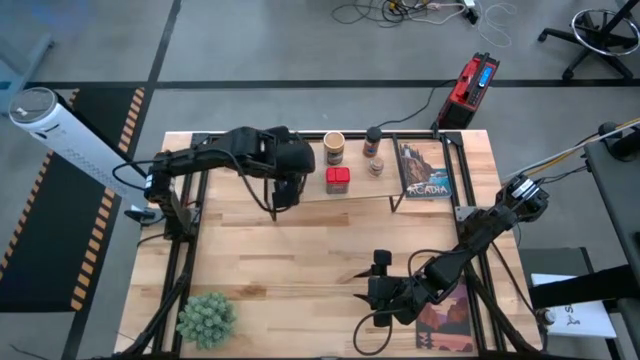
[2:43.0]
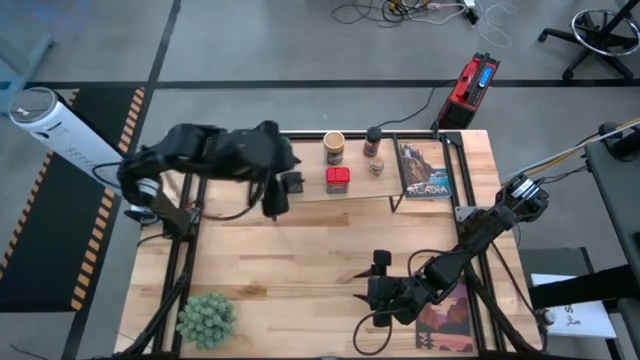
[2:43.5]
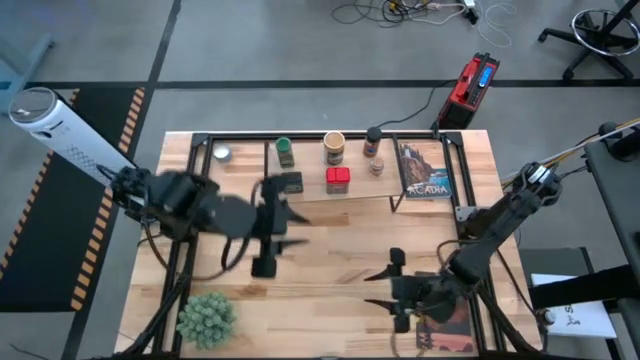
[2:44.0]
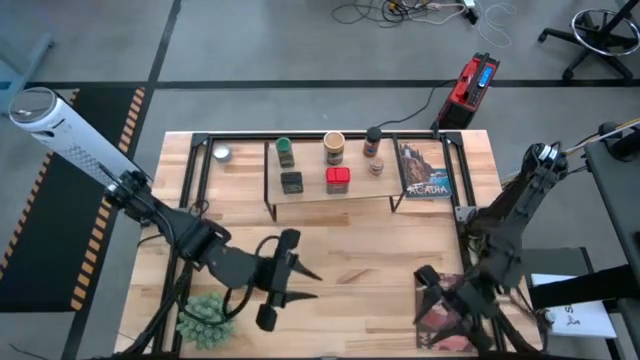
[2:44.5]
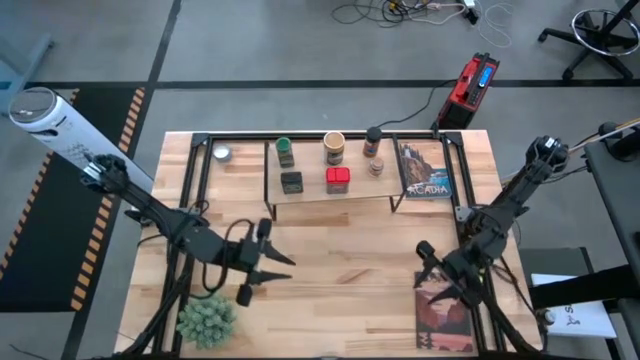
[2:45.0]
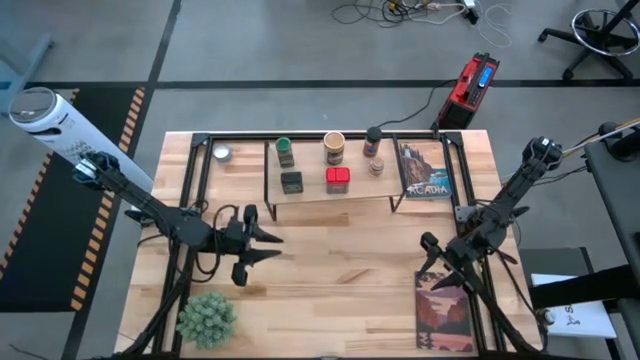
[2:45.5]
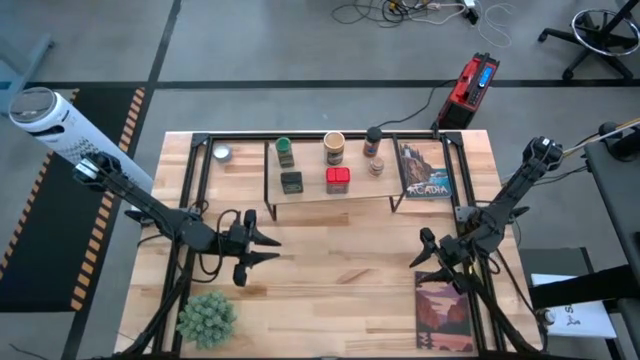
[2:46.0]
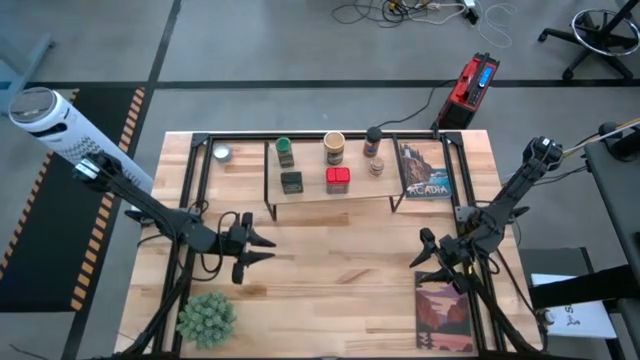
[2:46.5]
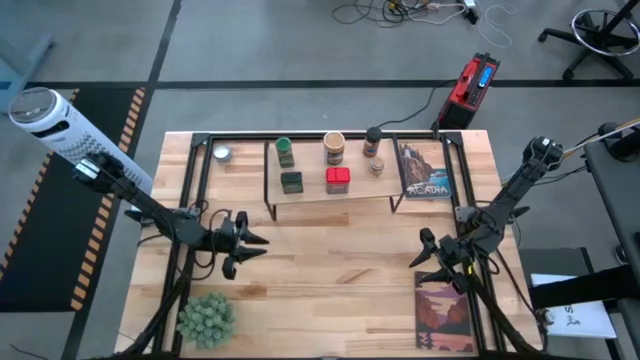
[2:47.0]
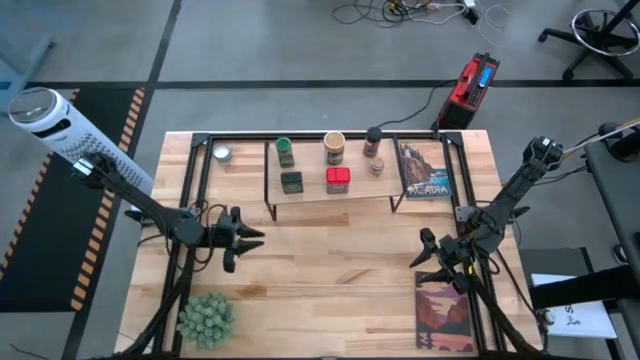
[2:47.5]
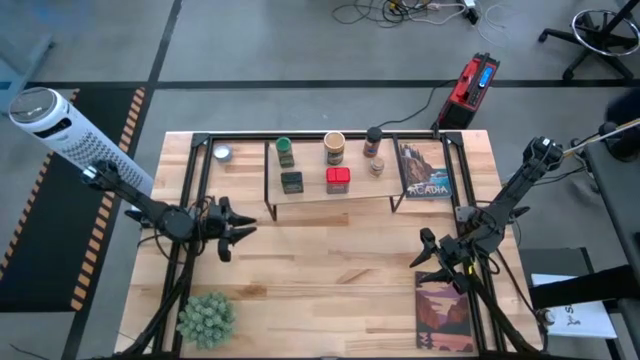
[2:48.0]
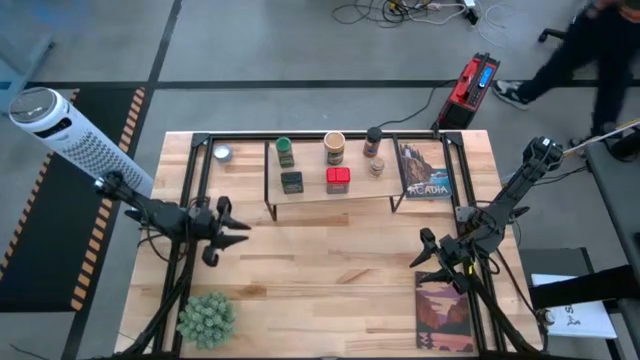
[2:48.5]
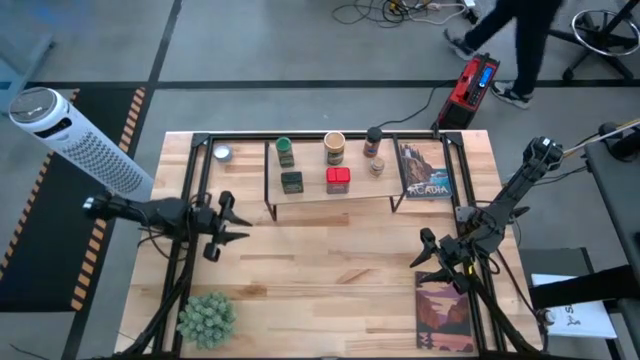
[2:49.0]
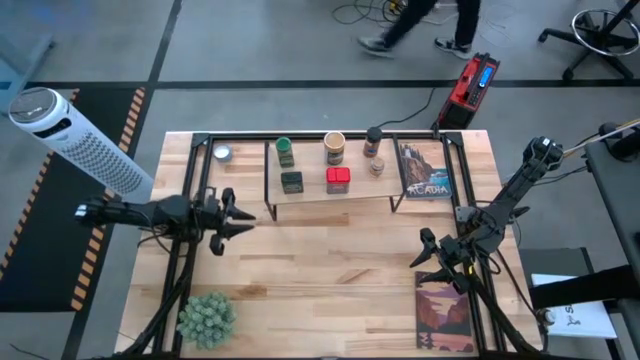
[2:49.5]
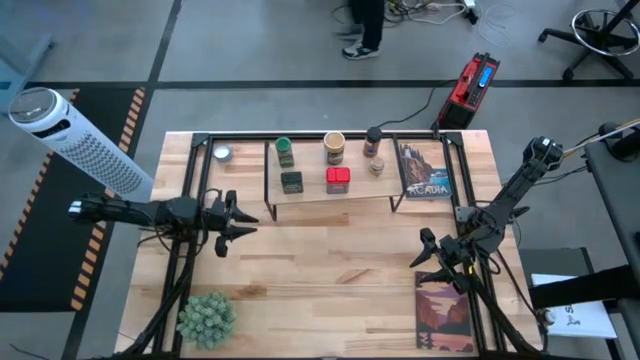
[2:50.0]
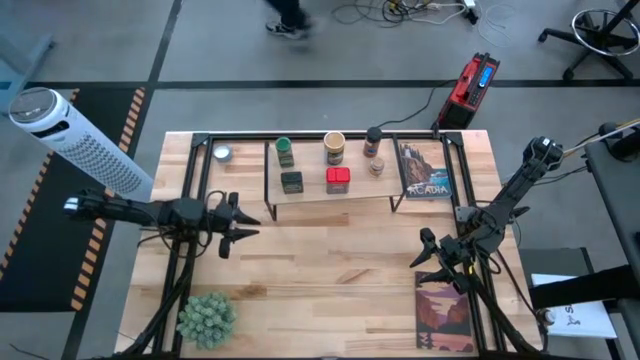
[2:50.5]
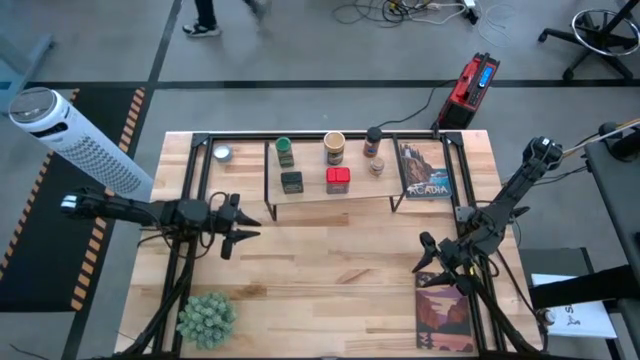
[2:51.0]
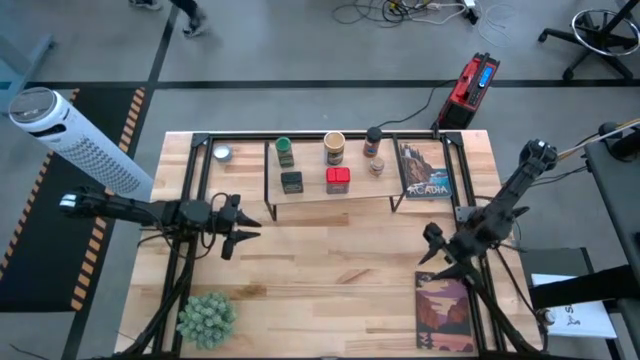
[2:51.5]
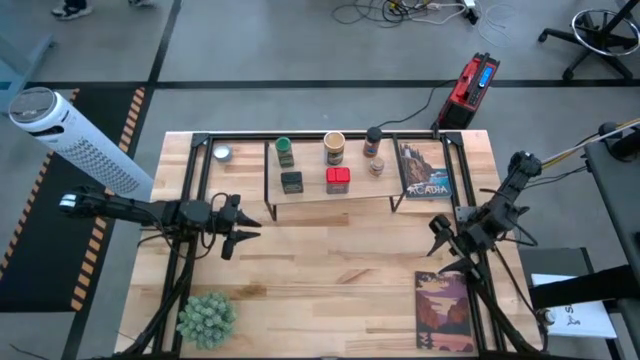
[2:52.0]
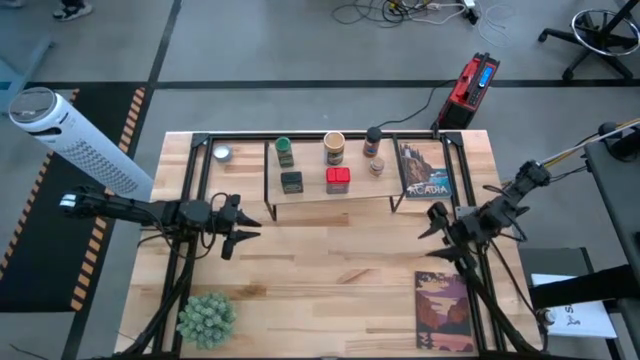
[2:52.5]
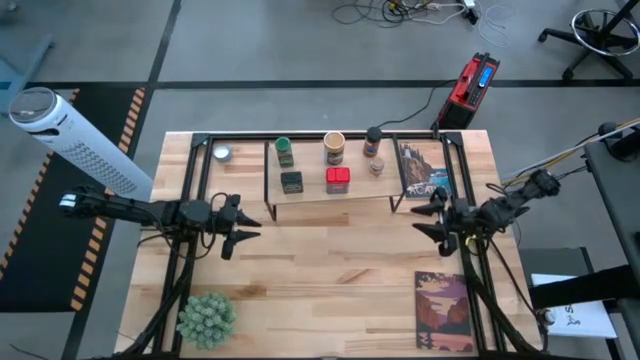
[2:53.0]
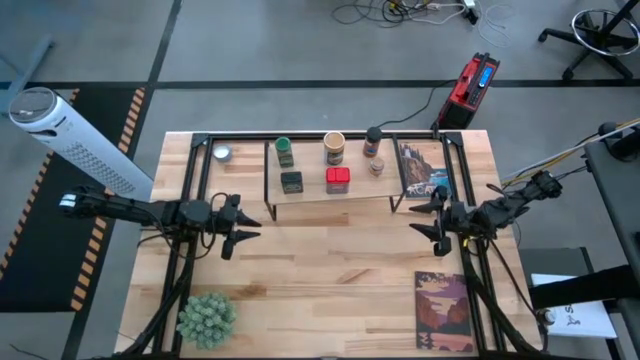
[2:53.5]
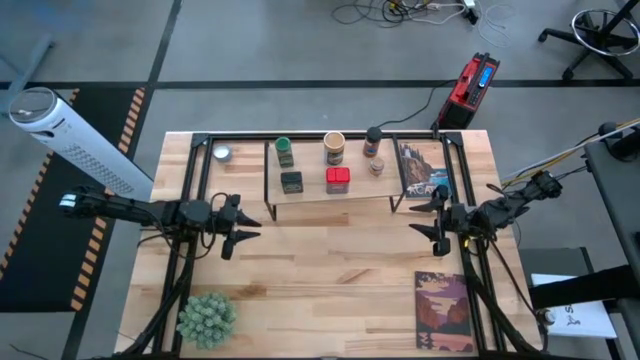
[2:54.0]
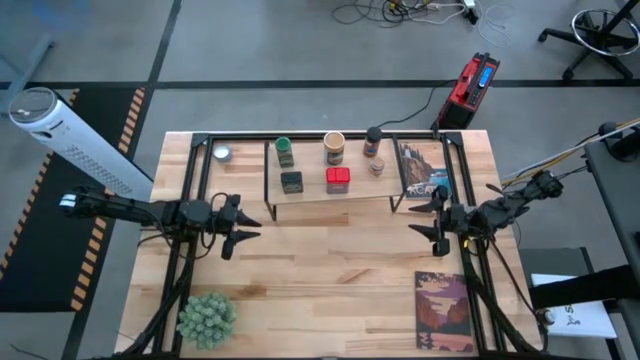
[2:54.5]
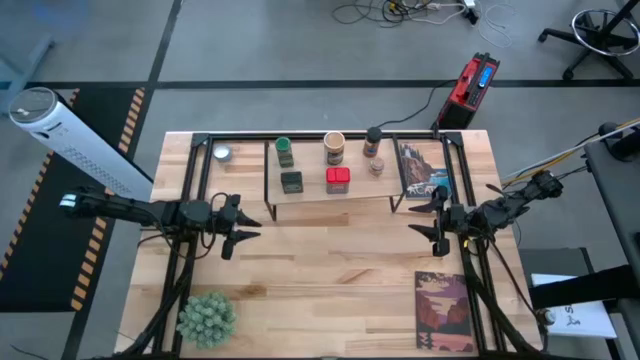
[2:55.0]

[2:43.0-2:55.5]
Task: Shelf spices
Return to Home Position

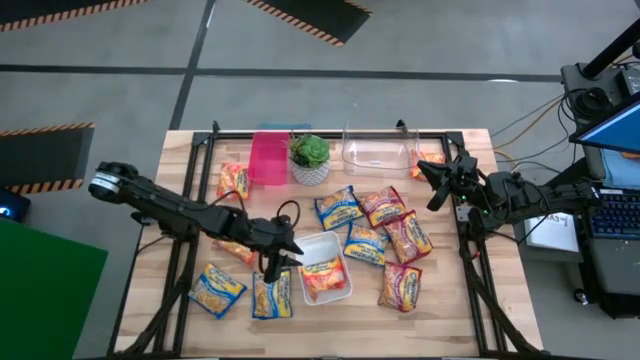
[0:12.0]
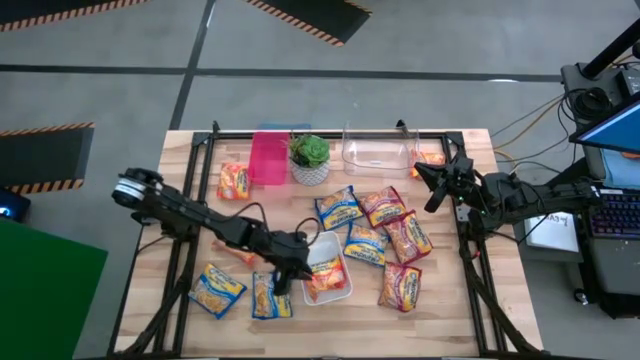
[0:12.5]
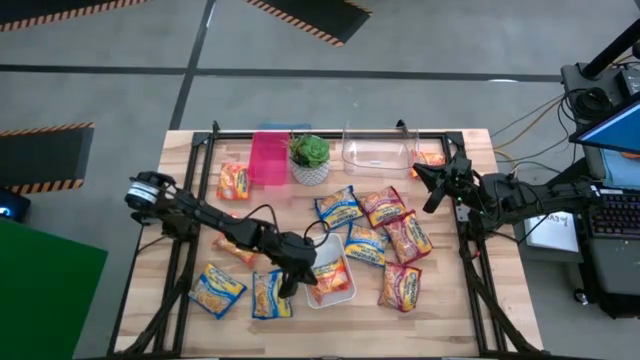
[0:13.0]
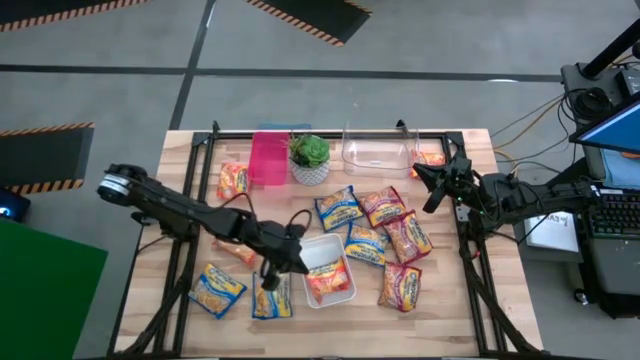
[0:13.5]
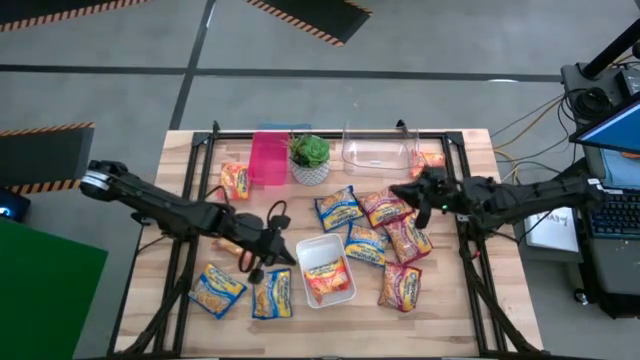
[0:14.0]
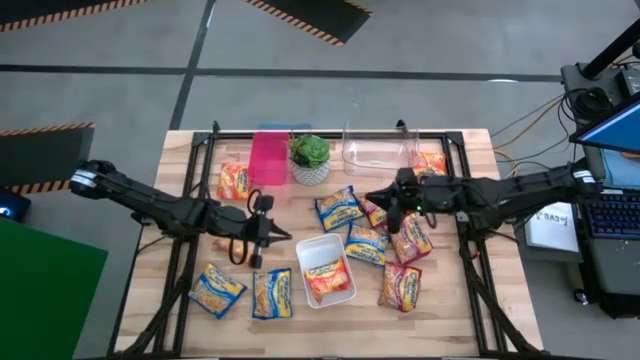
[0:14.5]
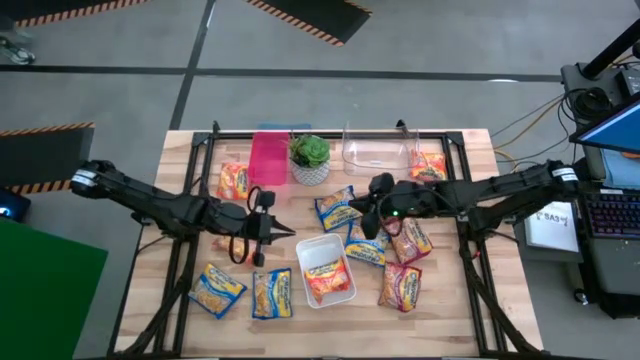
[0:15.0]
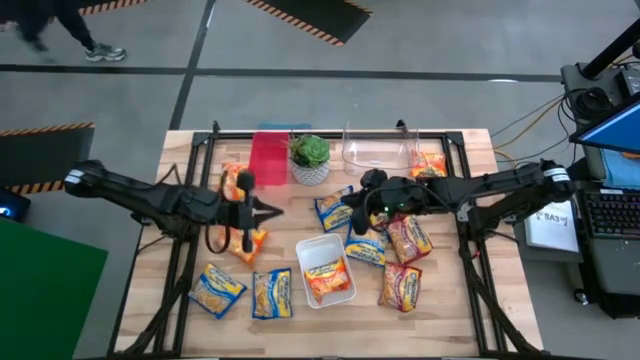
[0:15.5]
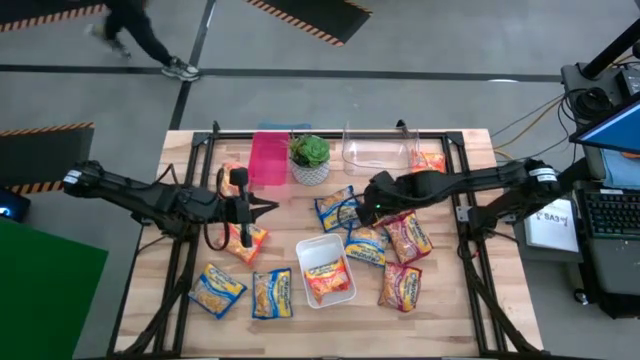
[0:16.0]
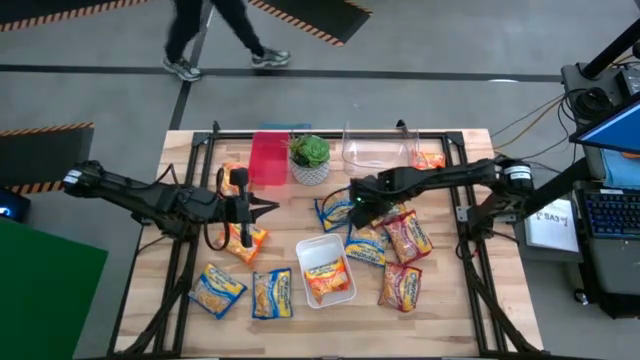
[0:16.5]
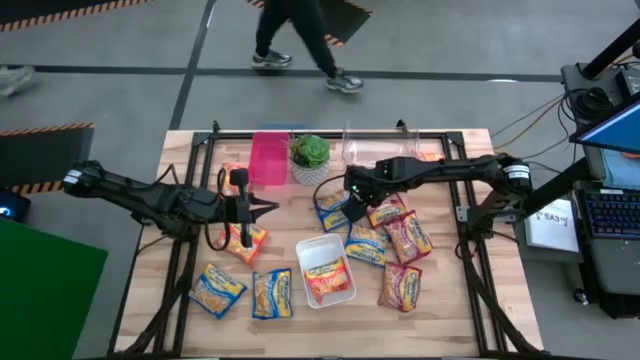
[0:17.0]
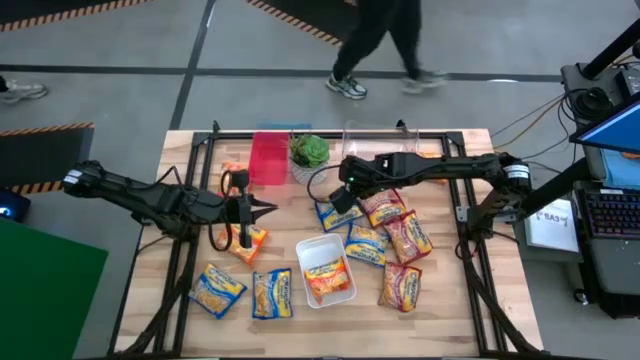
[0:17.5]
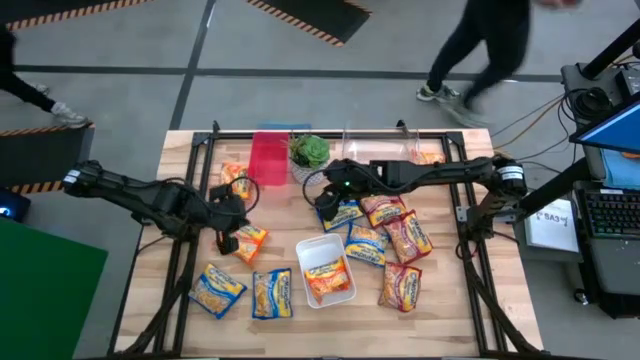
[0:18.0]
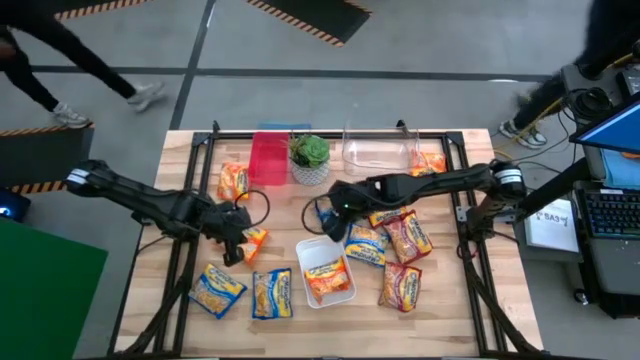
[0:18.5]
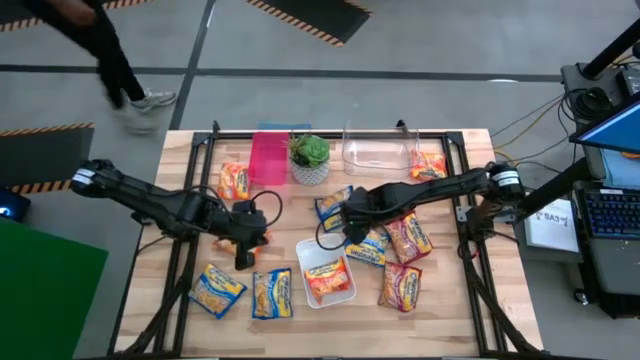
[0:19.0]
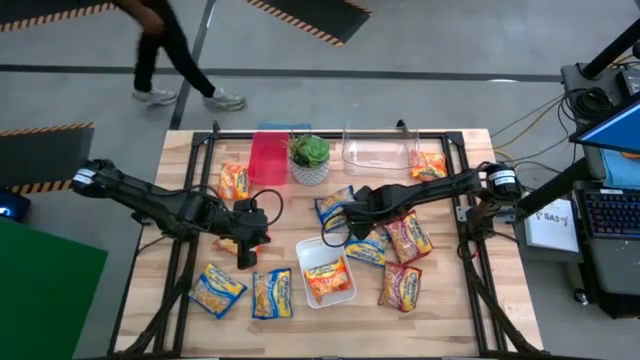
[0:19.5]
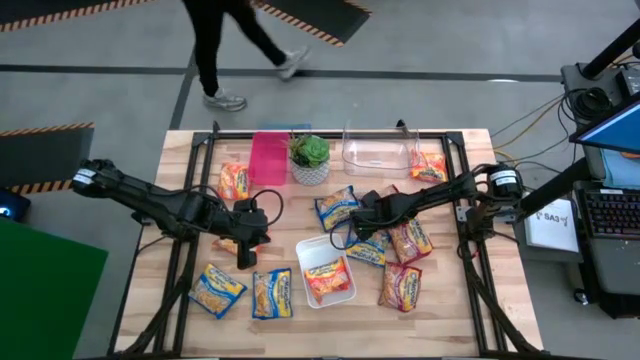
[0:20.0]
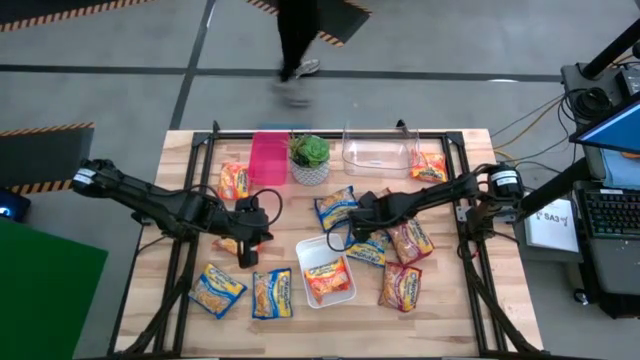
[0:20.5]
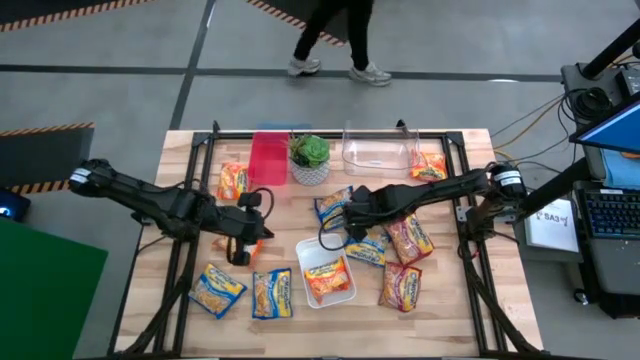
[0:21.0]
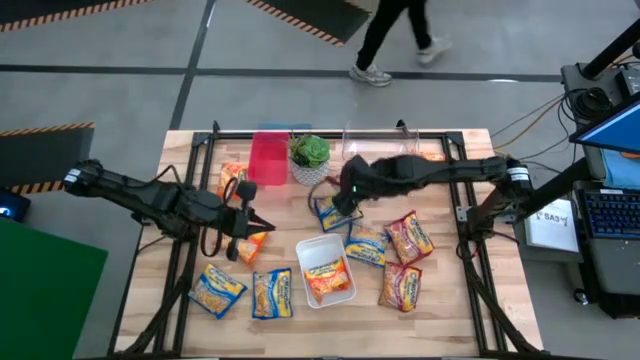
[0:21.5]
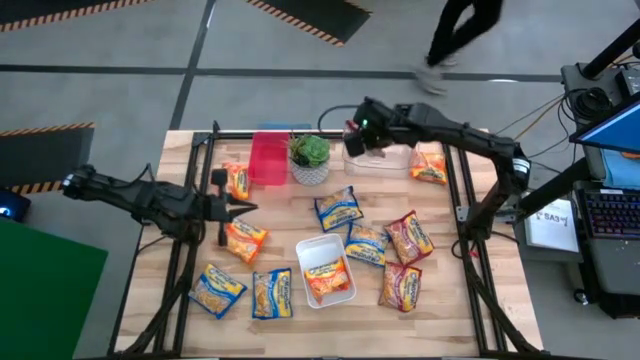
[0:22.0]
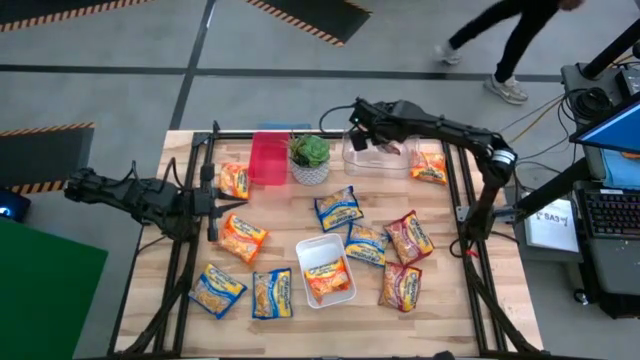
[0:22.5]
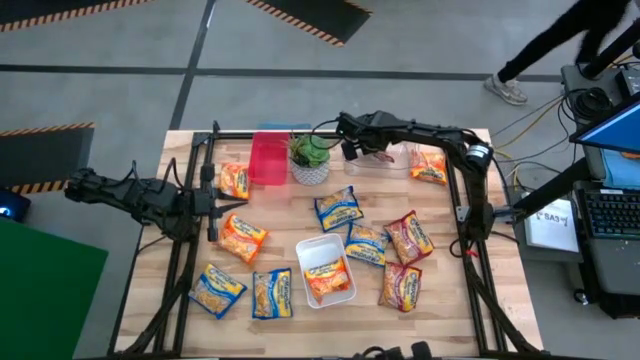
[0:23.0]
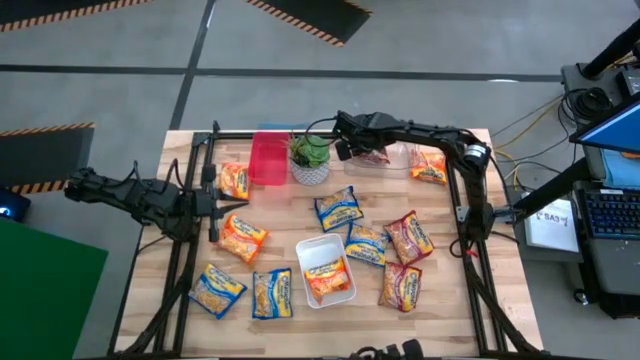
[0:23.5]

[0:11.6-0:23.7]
Task: Sort Maruchan noodles
Put the top red noodle pack into the transparent bin
